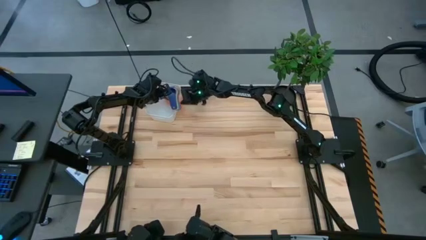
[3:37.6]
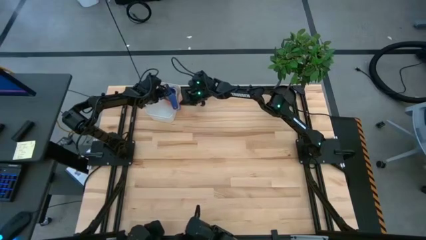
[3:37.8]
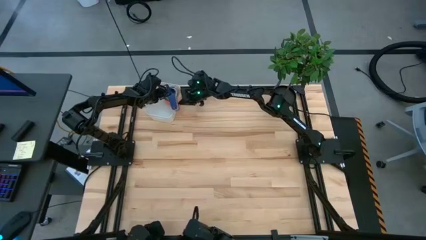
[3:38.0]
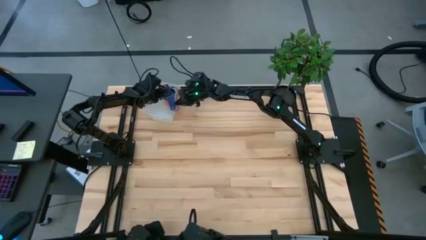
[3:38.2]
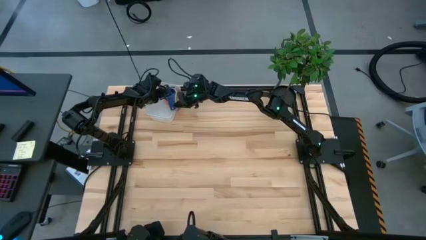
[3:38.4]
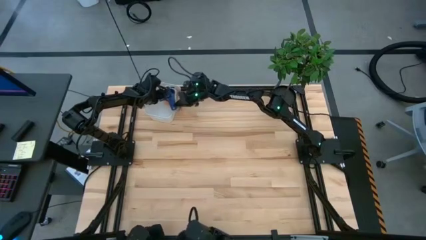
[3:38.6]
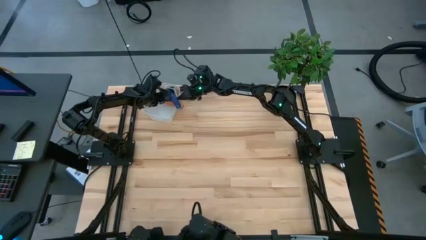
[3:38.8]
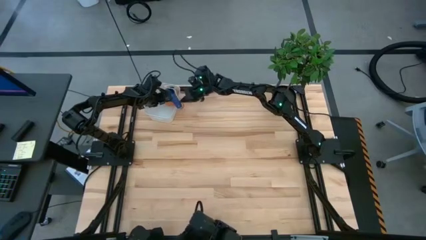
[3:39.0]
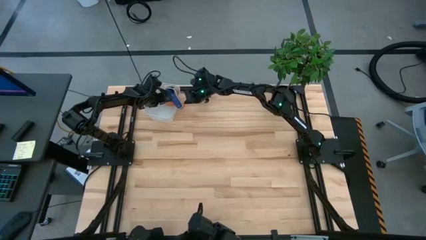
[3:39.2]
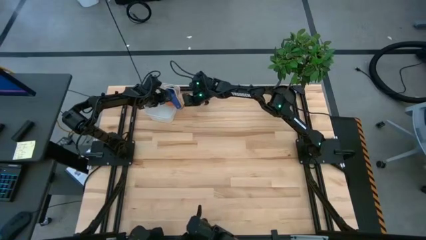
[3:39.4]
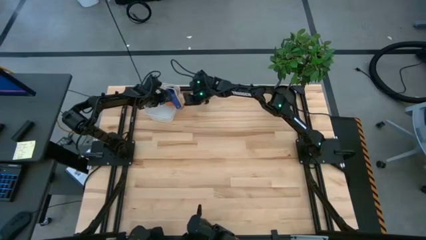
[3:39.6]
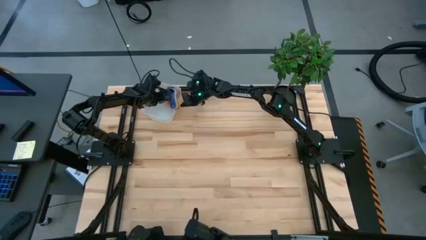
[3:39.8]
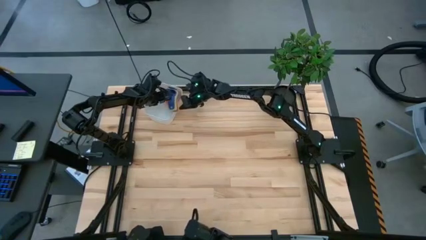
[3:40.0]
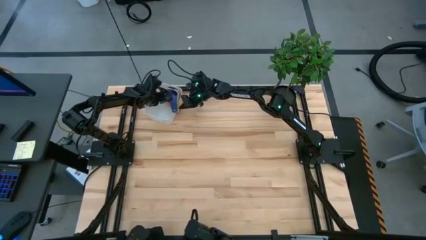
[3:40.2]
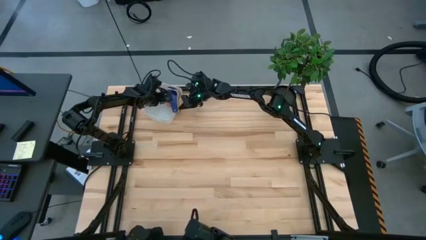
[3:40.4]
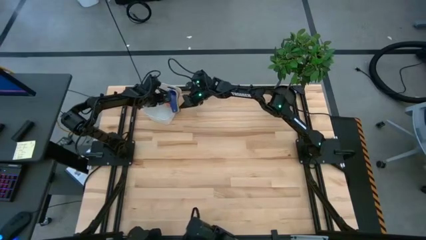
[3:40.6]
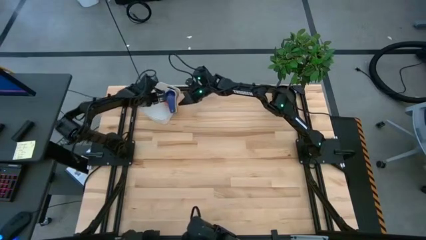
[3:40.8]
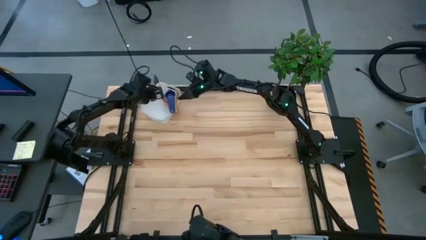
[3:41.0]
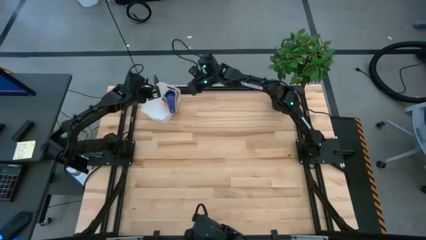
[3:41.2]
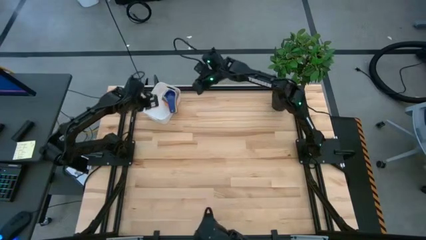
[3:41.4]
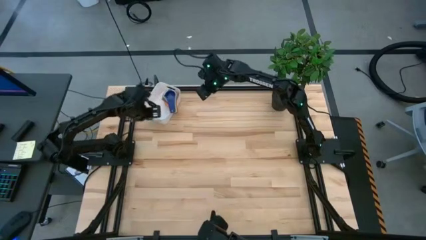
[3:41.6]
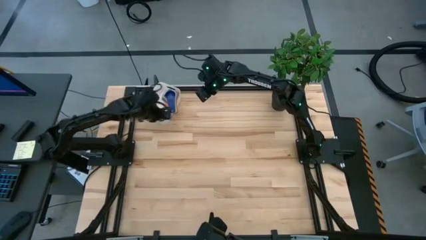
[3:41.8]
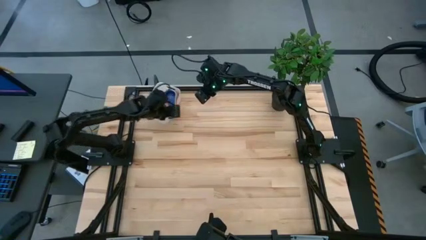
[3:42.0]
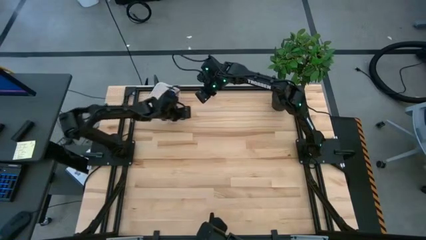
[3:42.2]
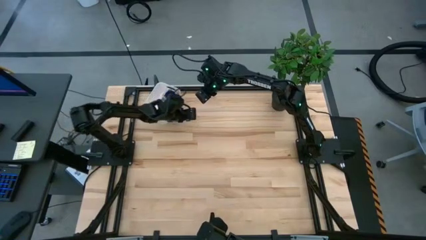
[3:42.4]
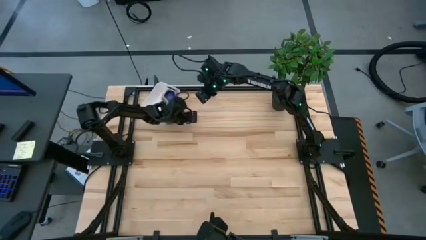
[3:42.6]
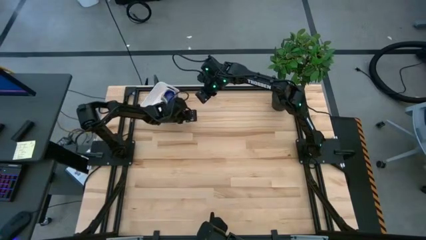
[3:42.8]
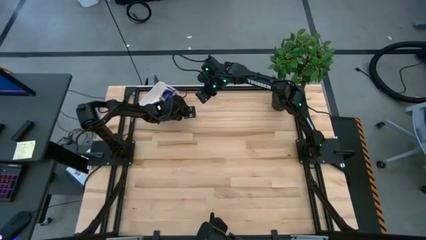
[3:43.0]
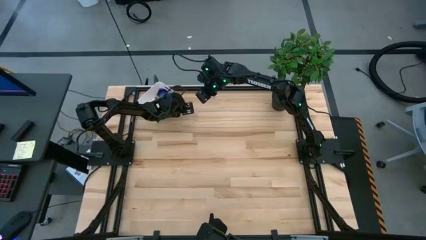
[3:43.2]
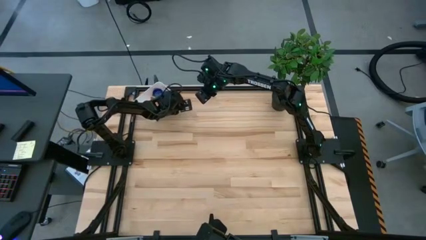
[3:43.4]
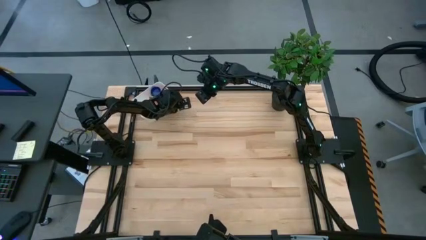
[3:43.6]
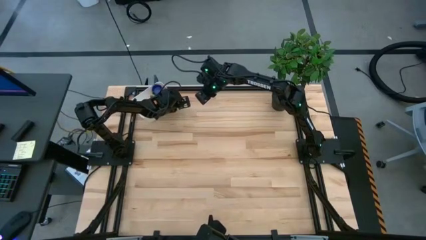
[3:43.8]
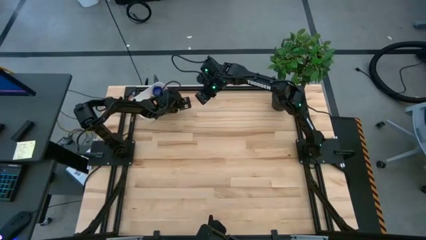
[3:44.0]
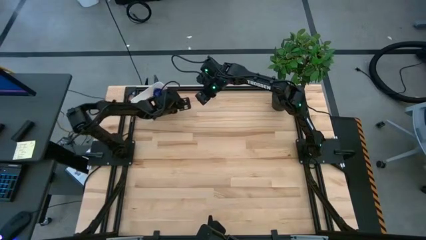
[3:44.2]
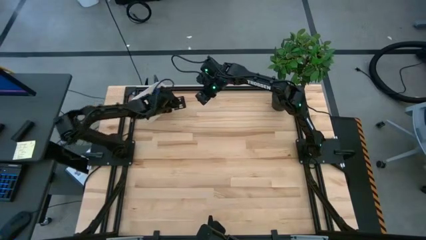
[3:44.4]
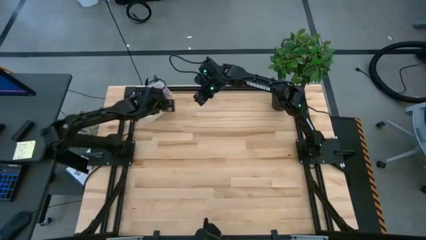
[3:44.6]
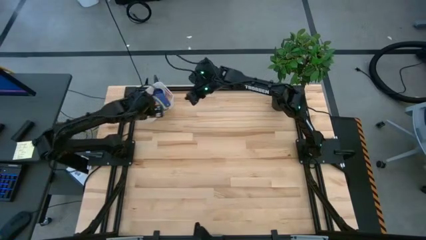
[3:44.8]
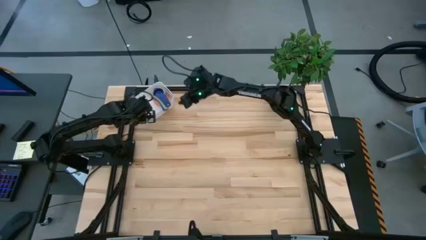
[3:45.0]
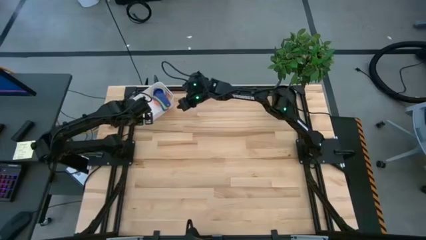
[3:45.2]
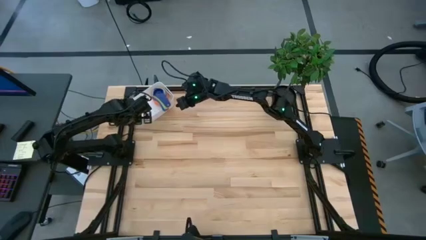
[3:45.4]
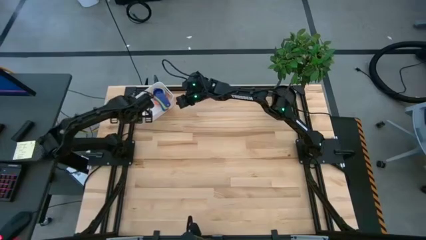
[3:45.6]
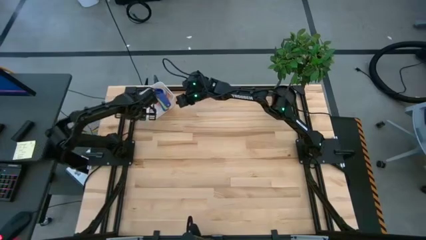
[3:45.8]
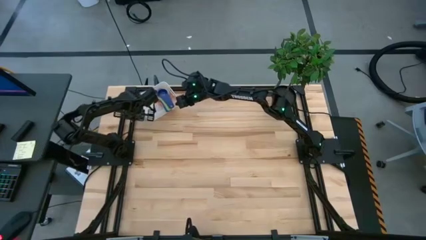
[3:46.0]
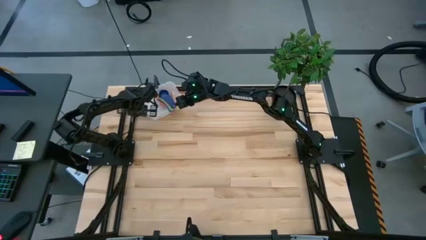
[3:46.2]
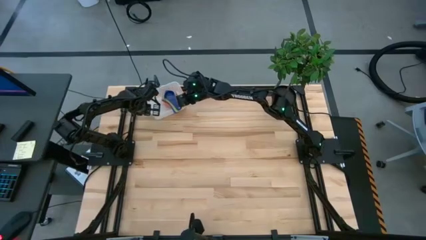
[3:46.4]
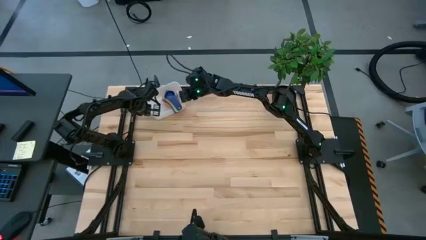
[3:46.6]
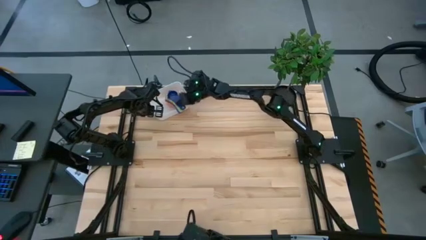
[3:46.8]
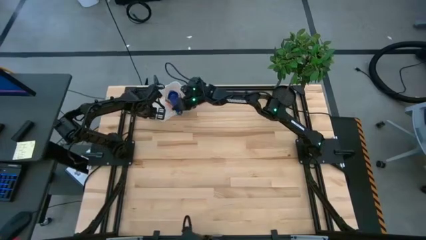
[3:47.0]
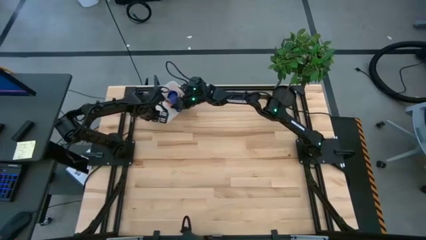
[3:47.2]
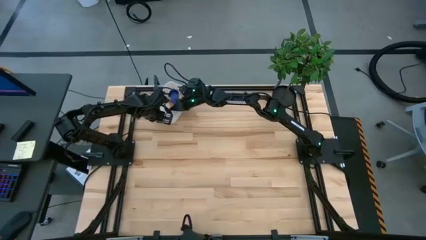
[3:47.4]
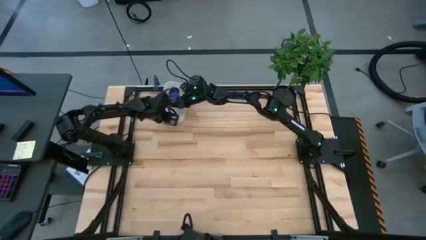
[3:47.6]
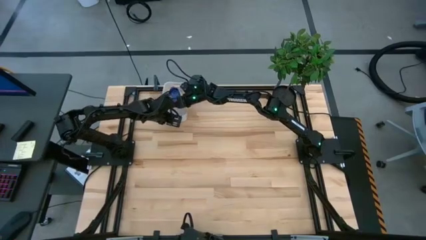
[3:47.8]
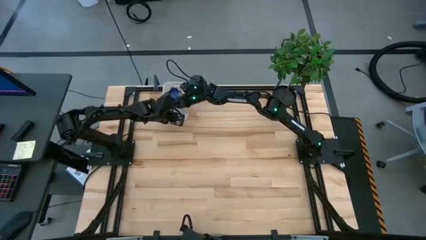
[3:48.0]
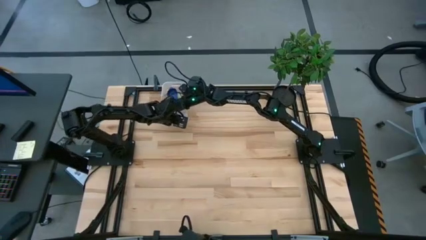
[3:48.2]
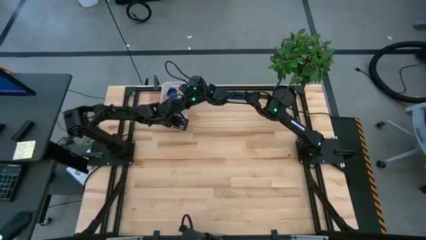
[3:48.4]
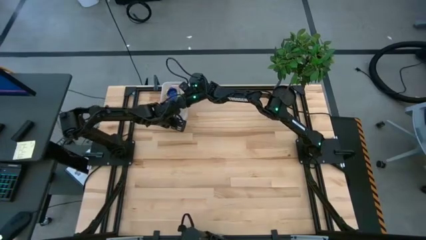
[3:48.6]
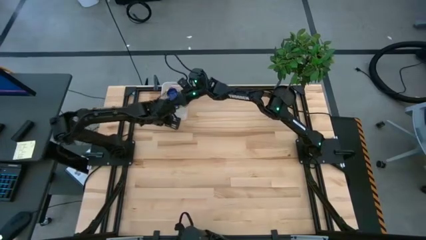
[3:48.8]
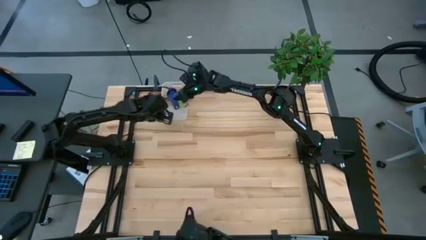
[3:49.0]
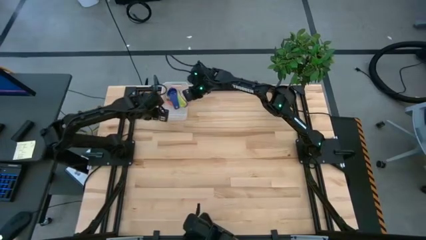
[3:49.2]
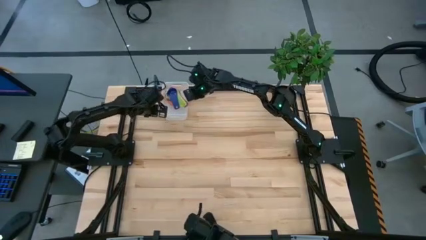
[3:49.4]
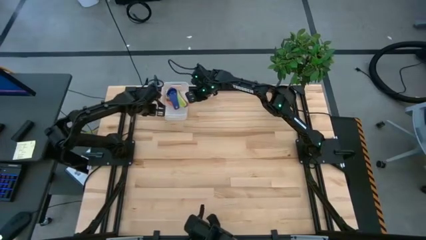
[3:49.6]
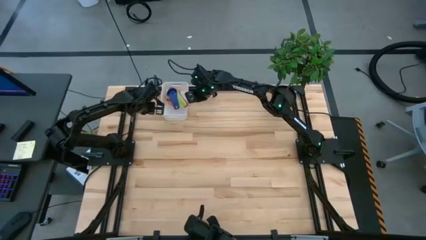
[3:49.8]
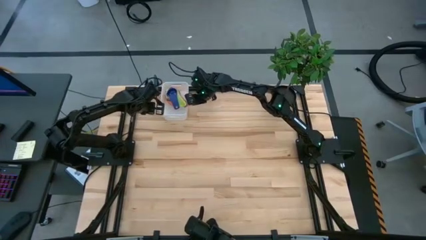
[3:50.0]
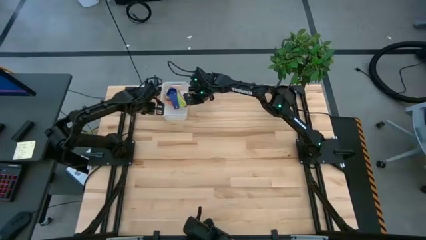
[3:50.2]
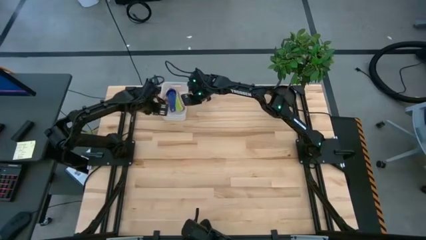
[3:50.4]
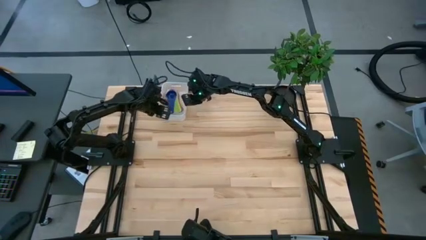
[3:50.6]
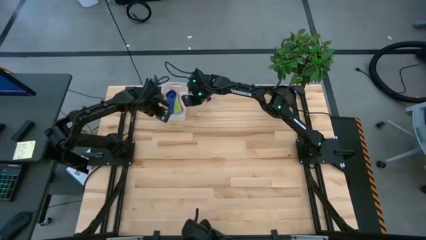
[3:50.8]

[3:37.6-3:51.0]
Task: Nest measuring cups in basket
Put the nested measuring cups into the white bin

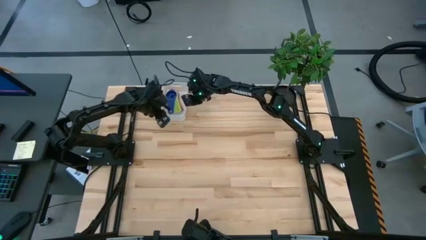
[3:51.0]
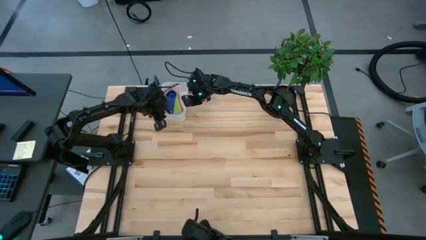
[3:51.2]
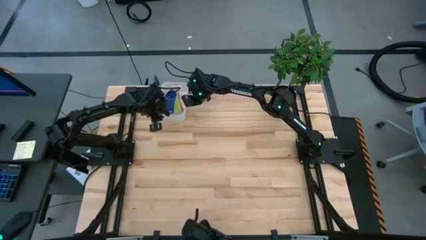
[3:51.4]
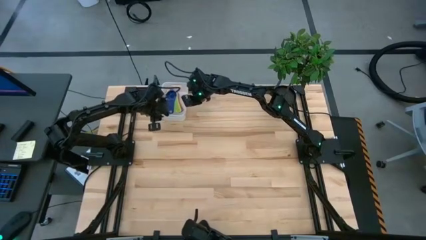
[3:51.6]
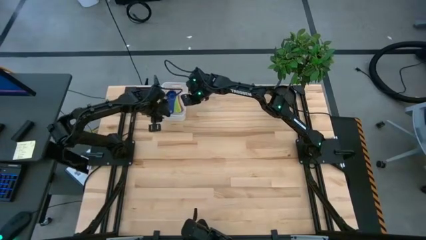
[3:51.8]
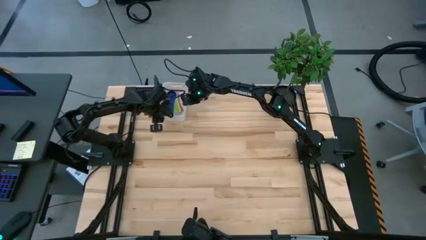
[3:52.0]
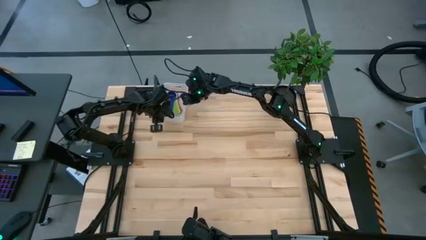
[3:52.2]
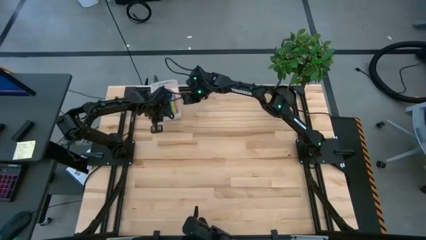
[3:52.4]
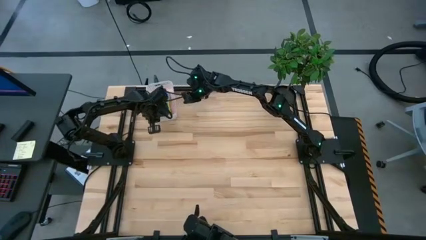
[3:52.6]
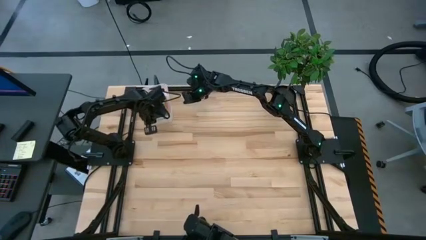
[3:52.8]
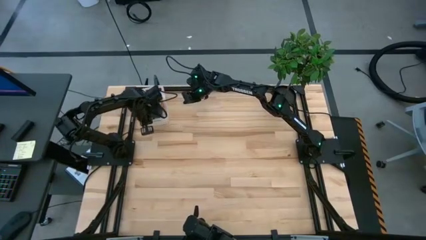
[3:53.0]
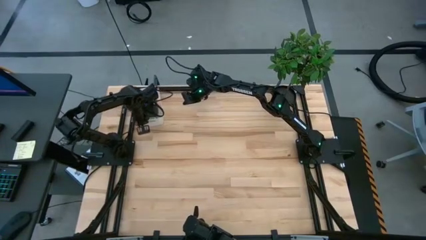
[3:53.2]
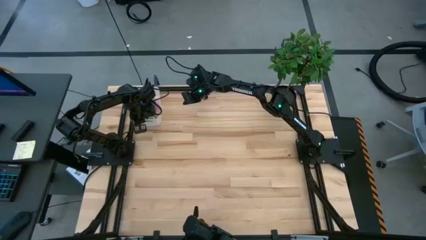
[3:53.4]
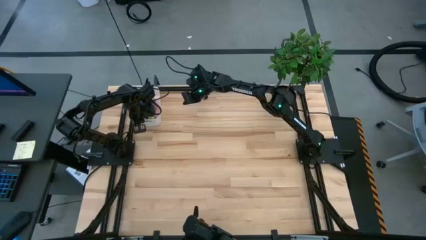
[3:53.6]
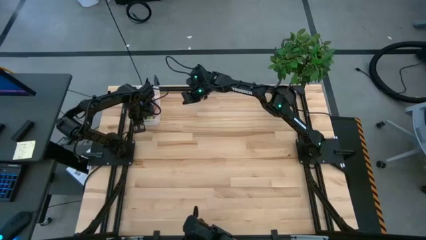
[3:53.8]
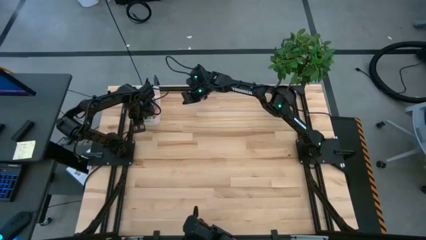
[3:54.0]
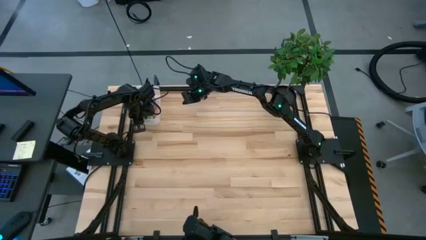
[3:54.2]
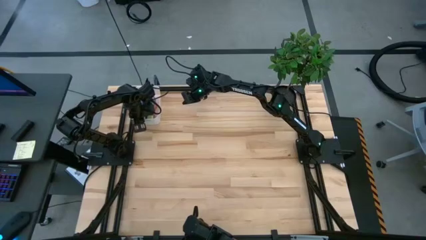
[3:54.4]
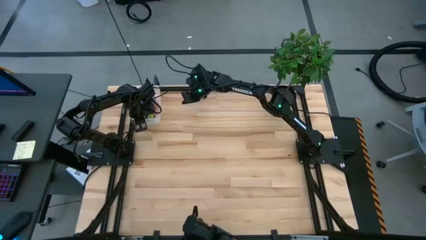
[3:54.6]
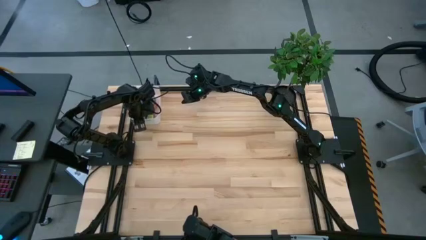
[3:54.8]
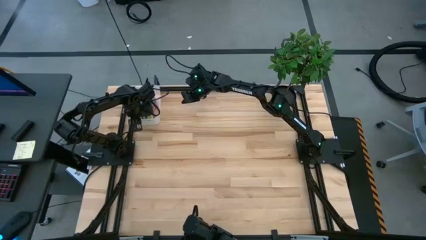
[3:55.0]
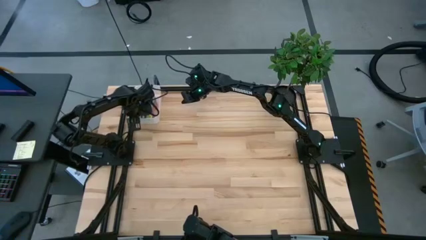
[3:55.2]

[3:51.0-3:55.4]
Adjust the white bin
